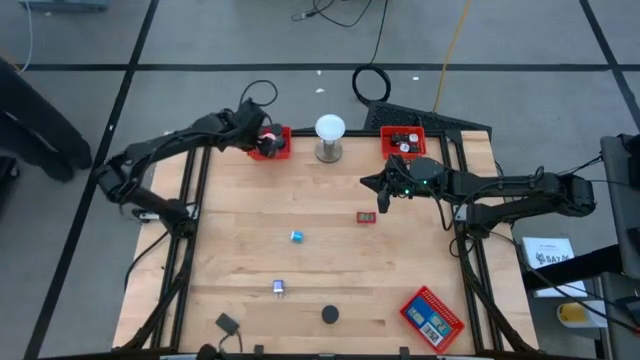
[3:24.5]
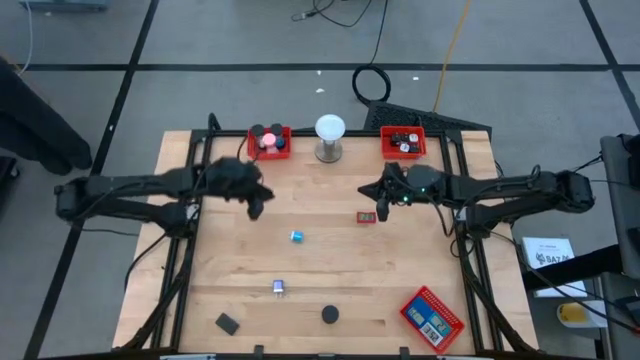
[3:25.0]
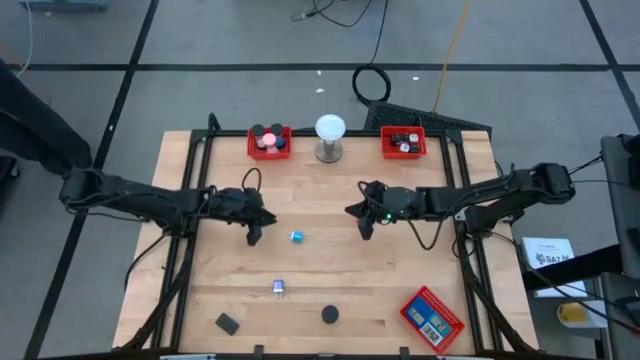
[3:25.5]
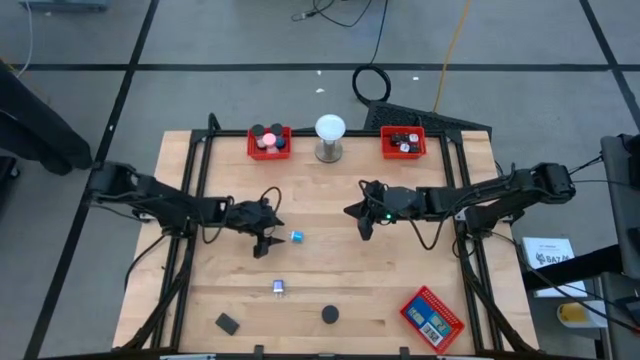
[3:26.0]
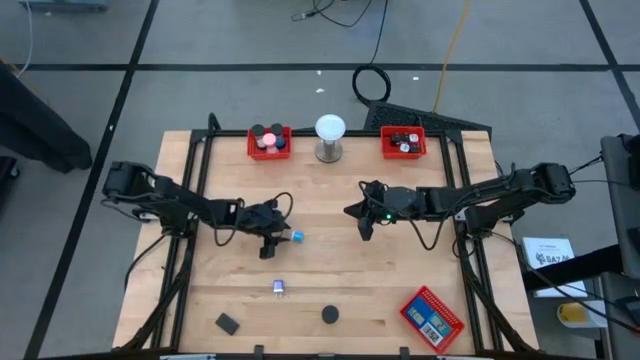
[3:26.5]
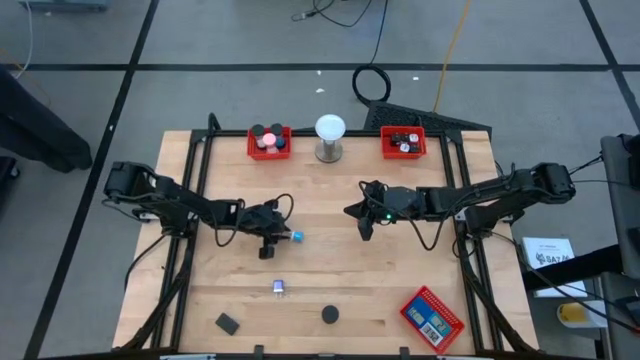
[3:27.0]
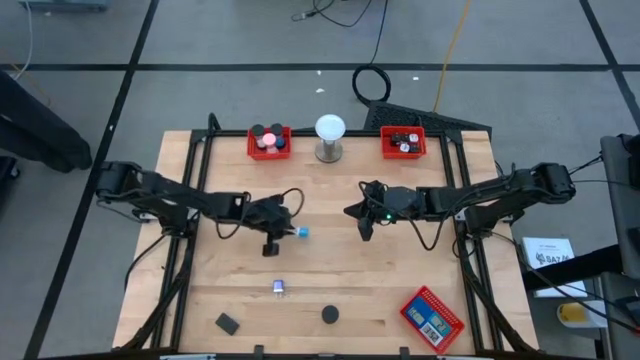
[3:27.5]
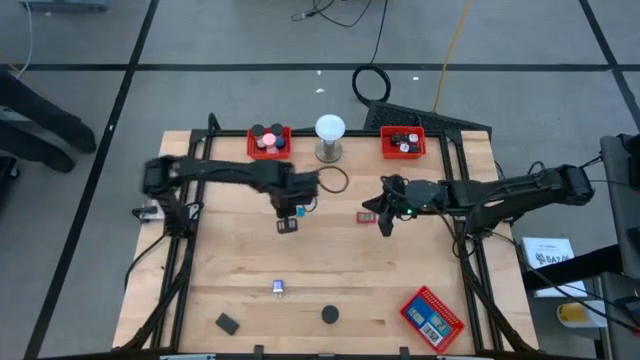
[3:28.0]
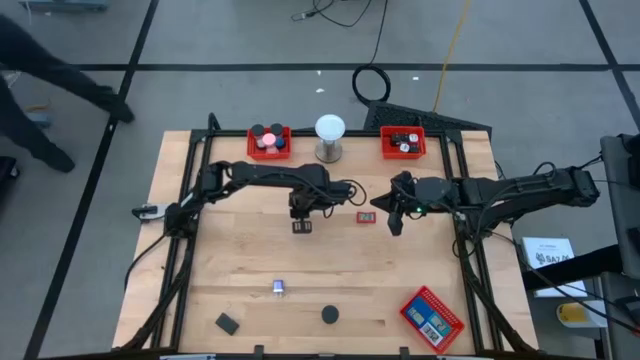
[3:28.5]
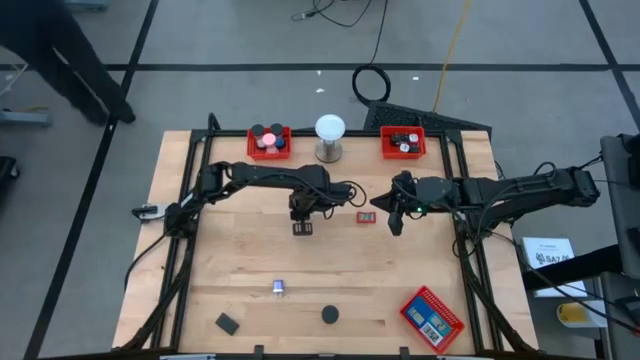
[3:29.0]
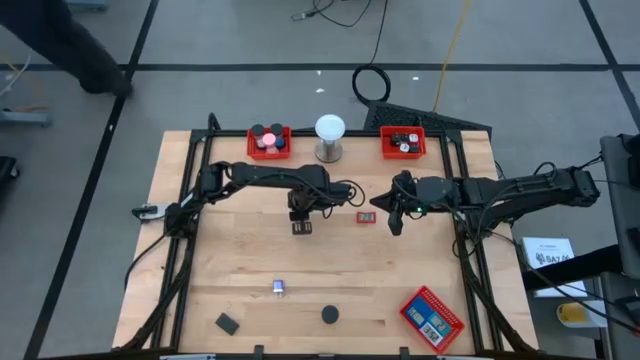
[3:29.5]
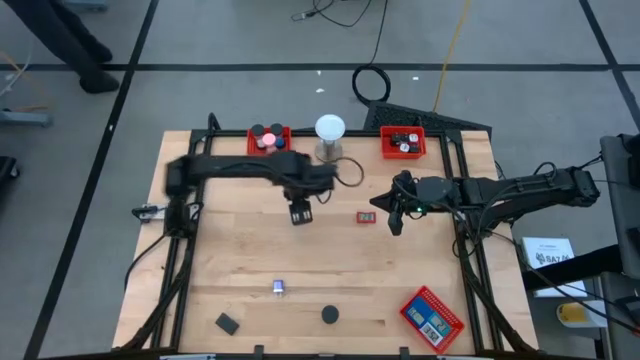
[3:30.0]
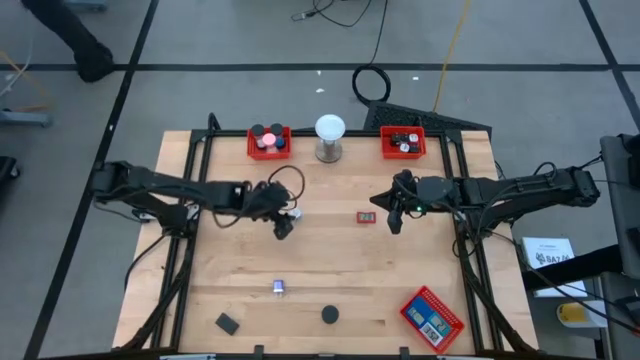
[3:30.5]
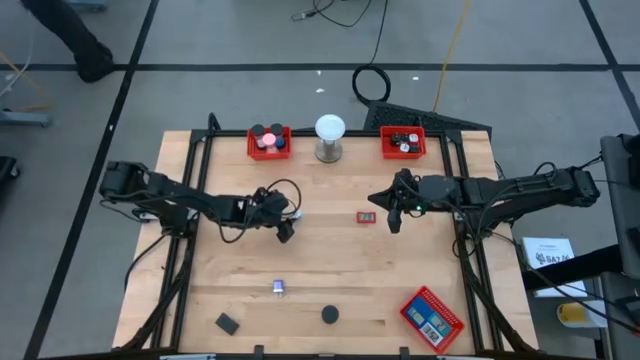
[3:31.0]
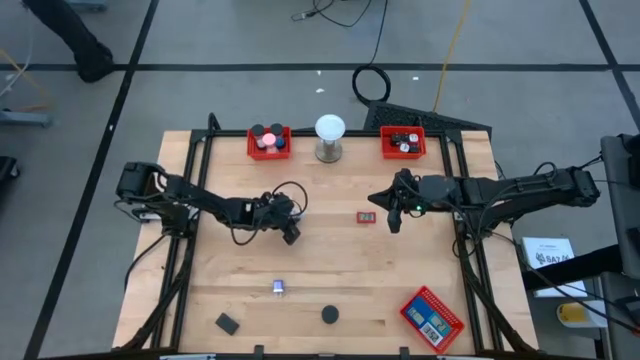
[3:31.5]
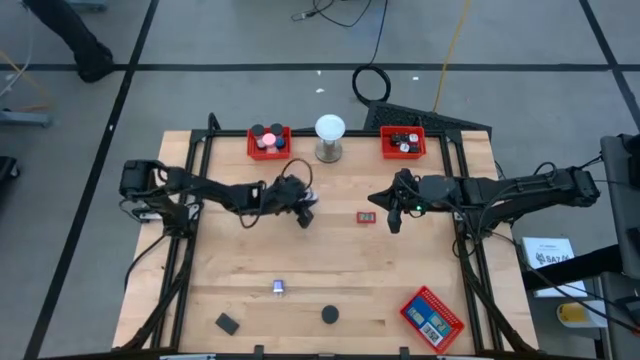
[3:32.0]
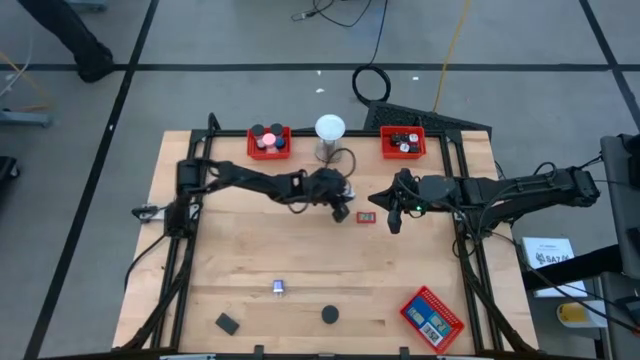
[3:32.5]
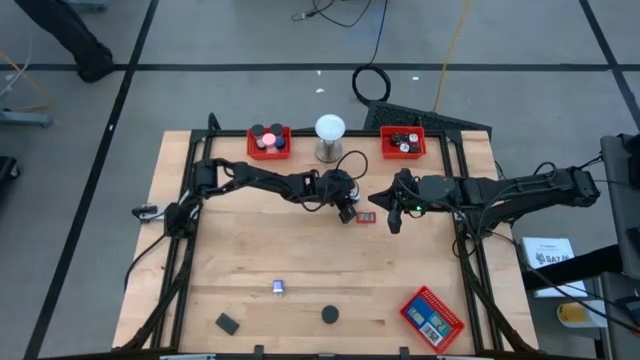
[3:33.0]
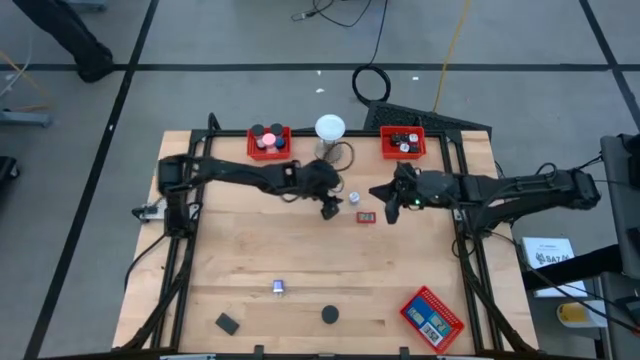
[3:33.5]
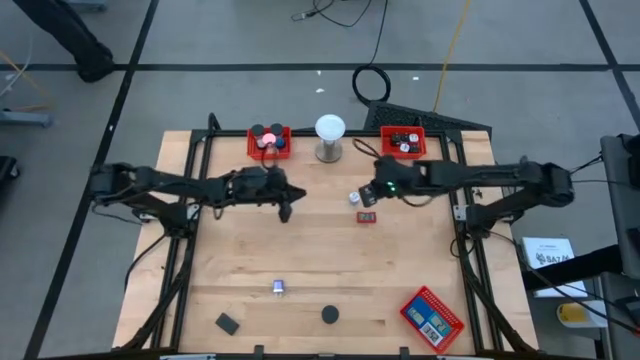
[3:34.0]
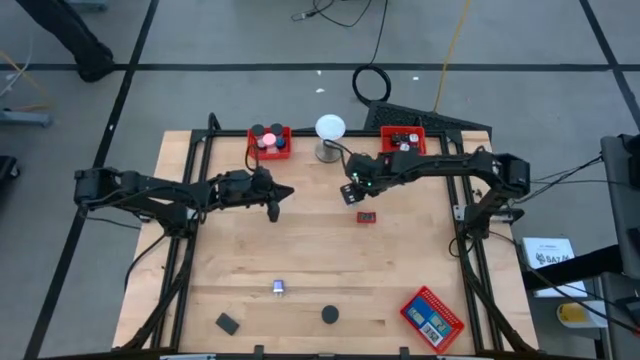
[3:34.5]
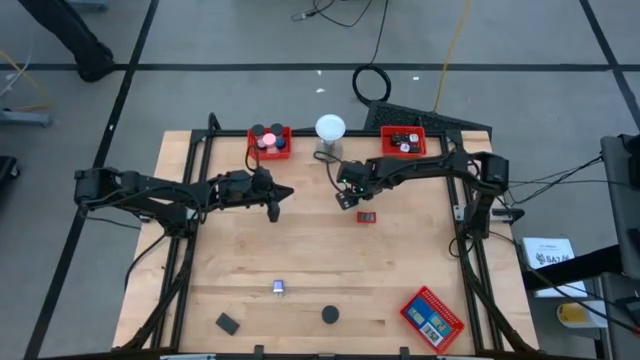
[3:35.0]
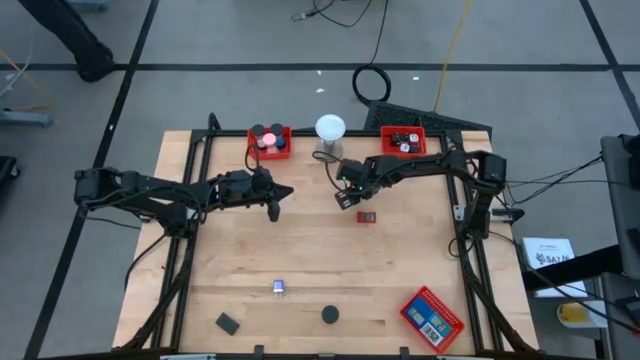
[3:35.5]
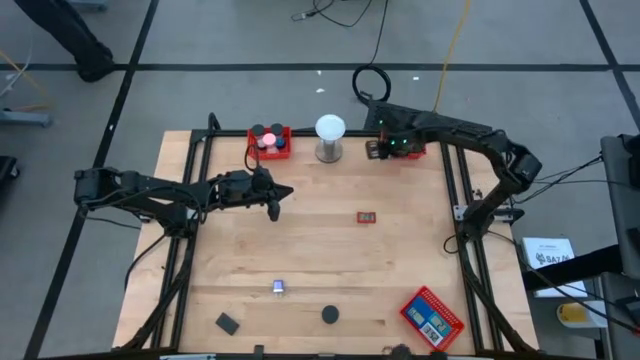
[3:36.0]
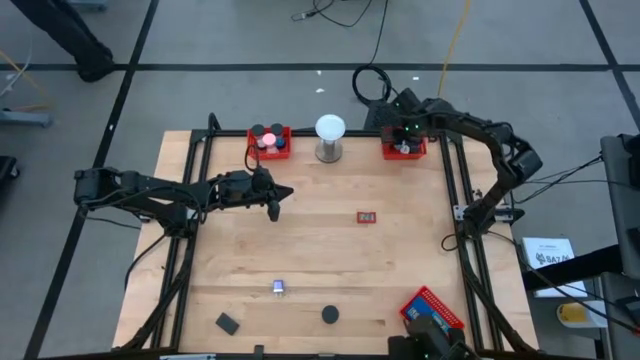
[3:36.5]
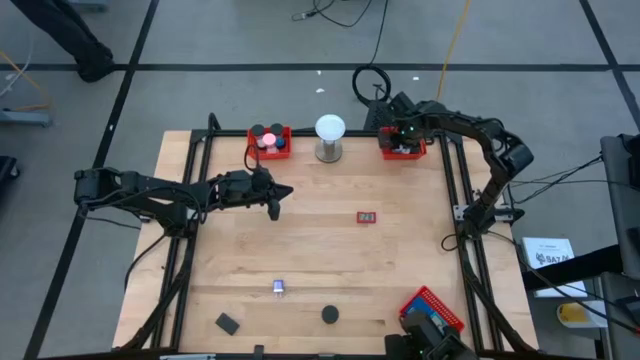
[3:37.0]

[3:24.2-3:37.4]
Task: Pick & Place Office items
Put the blue charger adapter into the top right red bin

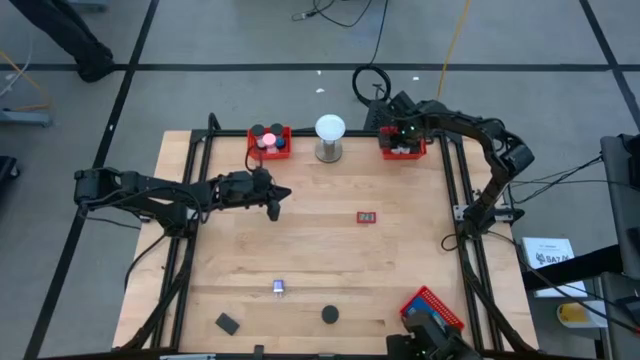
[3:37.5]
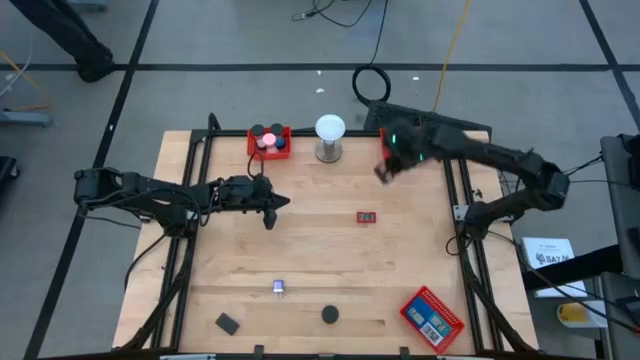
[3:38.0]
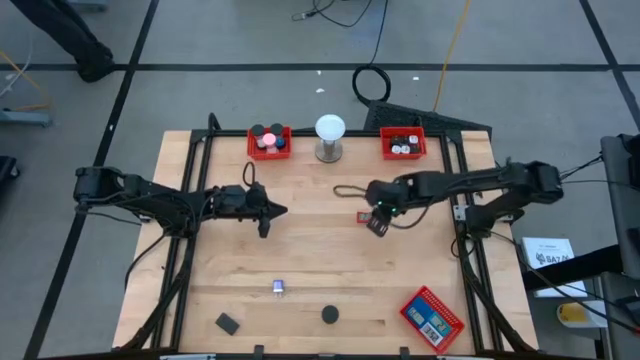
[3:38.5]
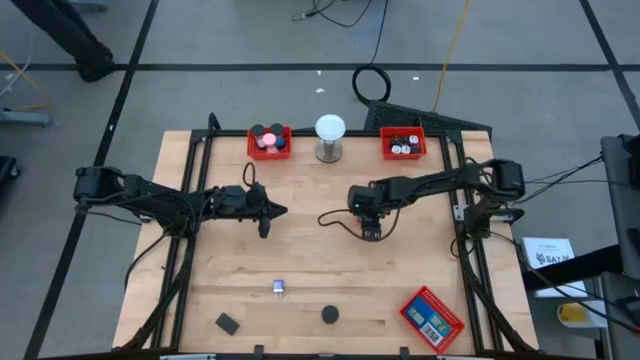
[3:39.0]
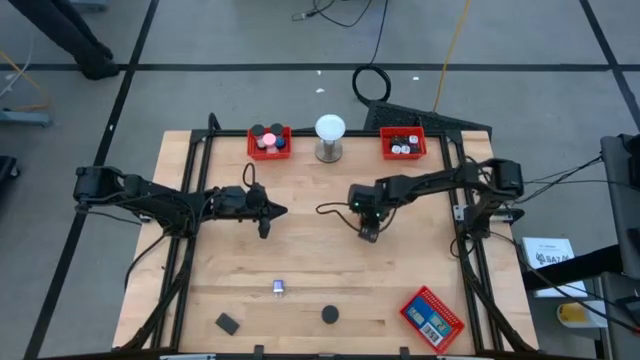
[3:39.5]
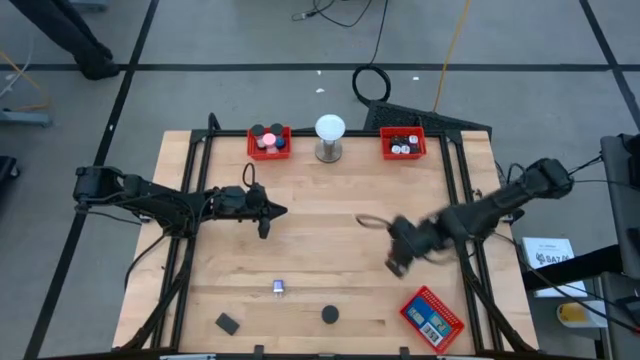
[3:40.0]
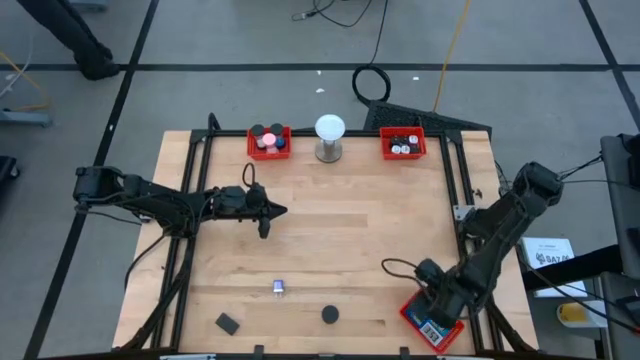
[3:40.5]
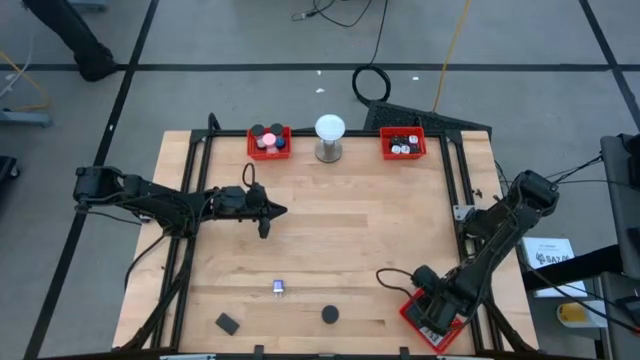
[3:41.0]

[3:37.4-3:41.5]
Put the red digital clock into the bottom right red bin
